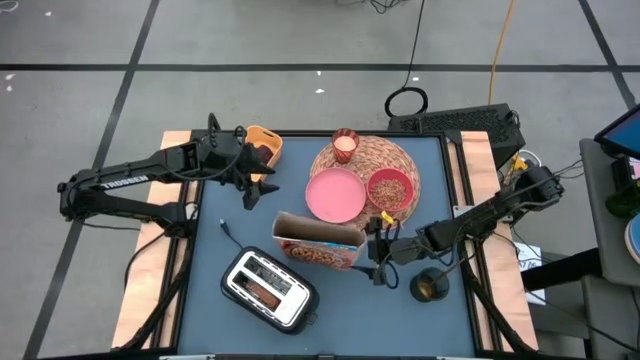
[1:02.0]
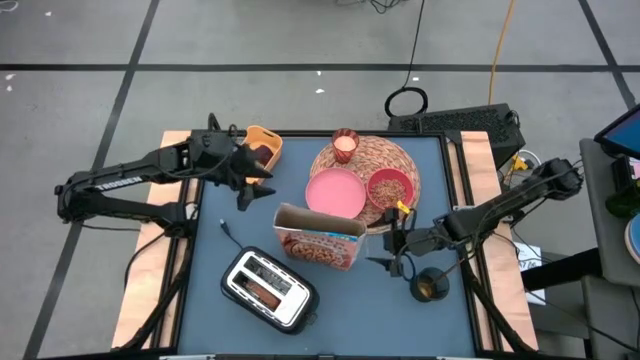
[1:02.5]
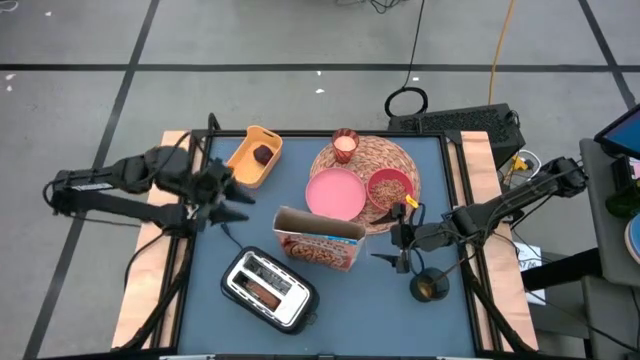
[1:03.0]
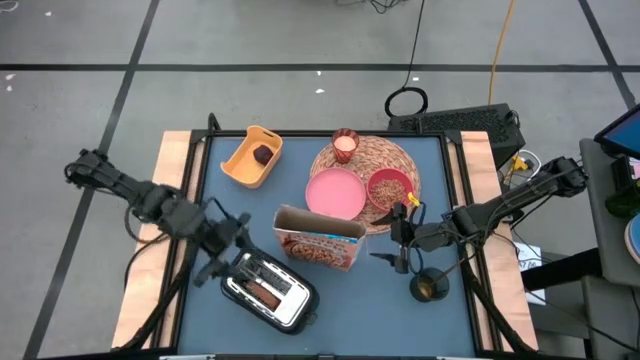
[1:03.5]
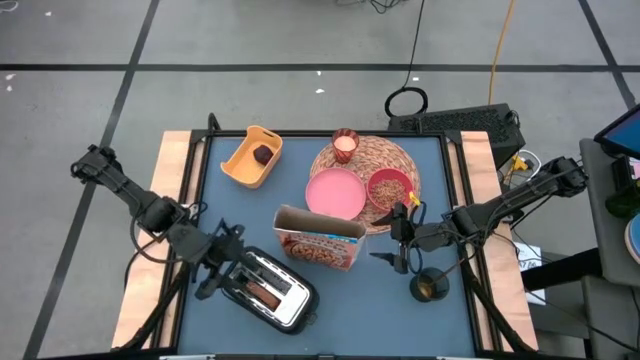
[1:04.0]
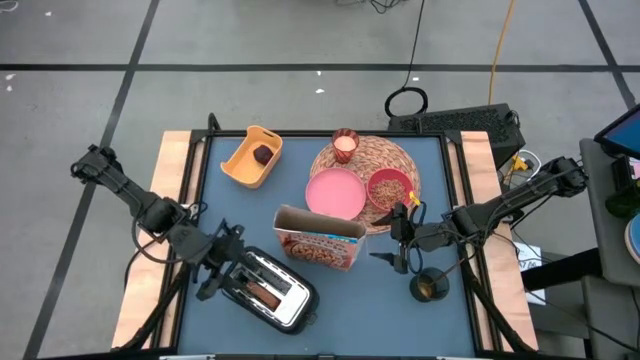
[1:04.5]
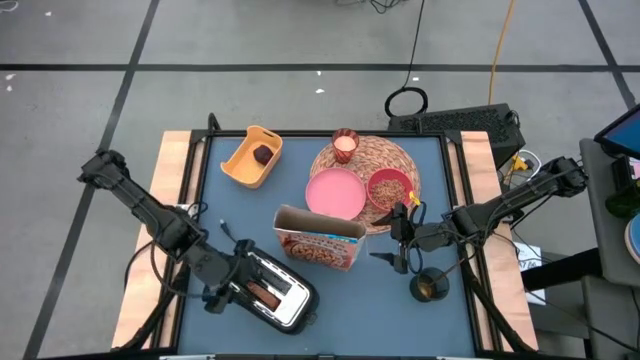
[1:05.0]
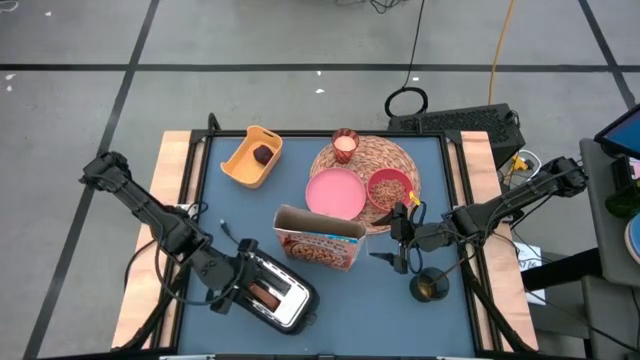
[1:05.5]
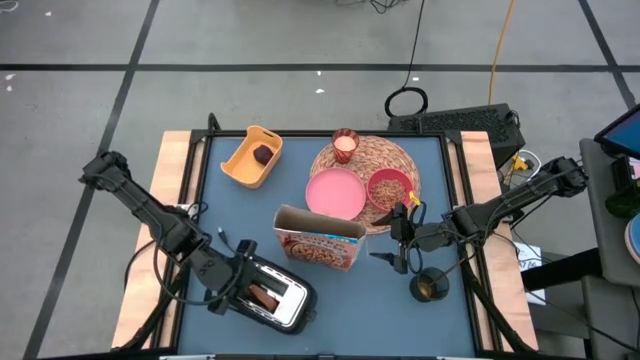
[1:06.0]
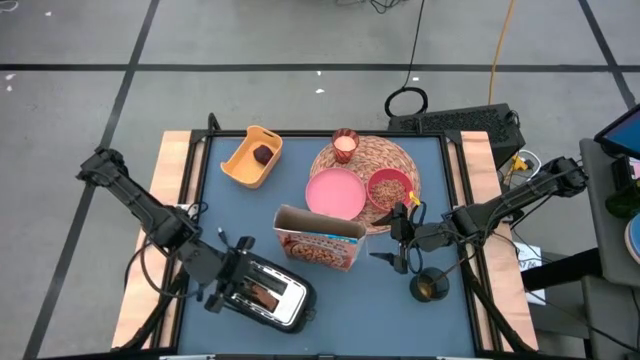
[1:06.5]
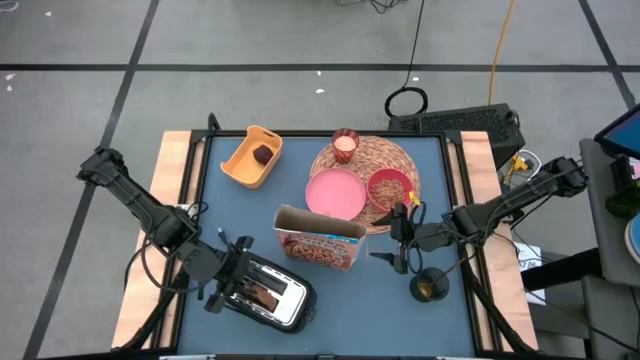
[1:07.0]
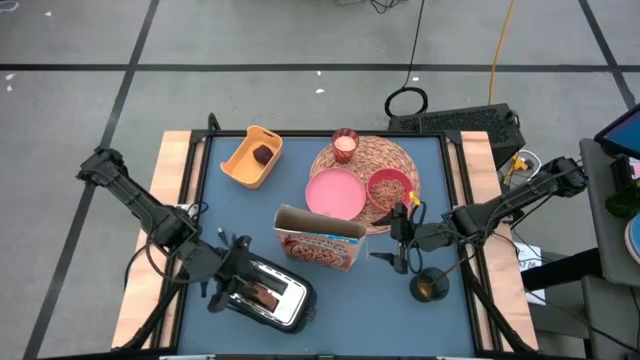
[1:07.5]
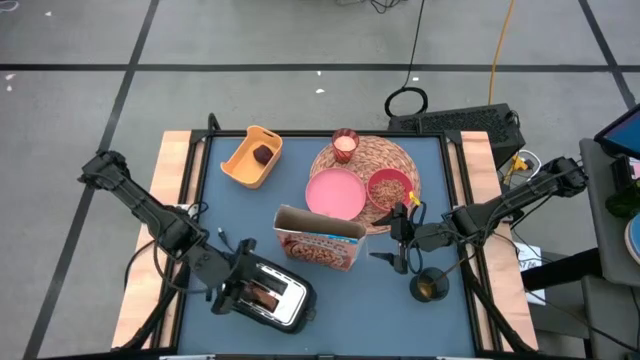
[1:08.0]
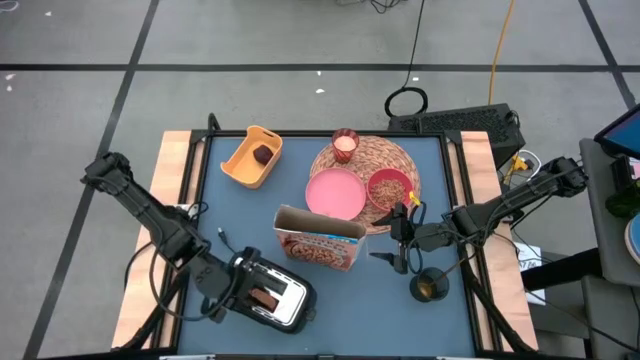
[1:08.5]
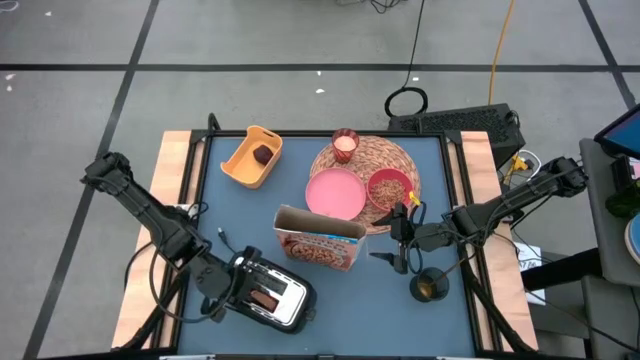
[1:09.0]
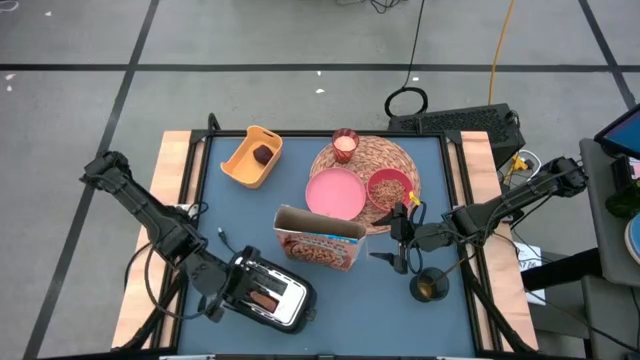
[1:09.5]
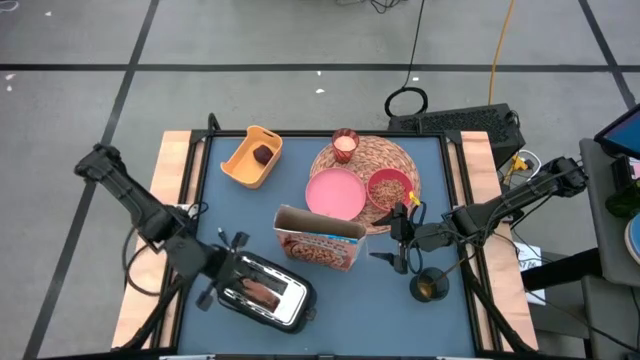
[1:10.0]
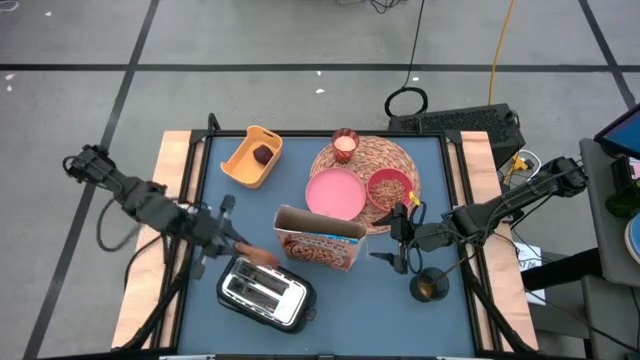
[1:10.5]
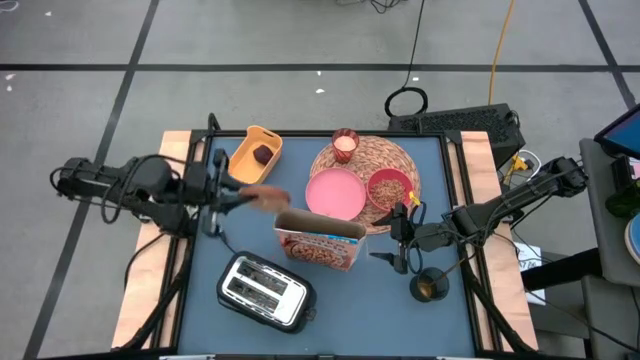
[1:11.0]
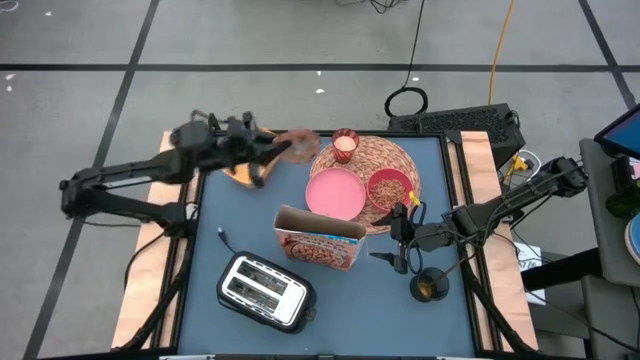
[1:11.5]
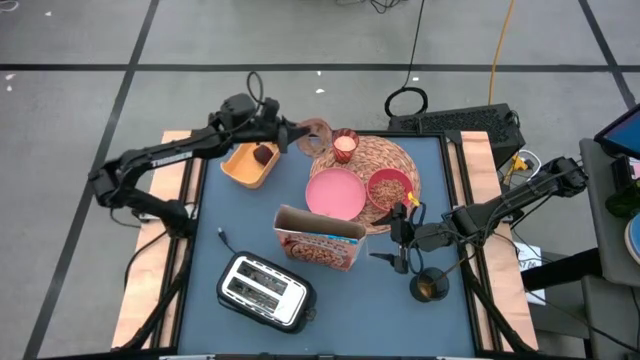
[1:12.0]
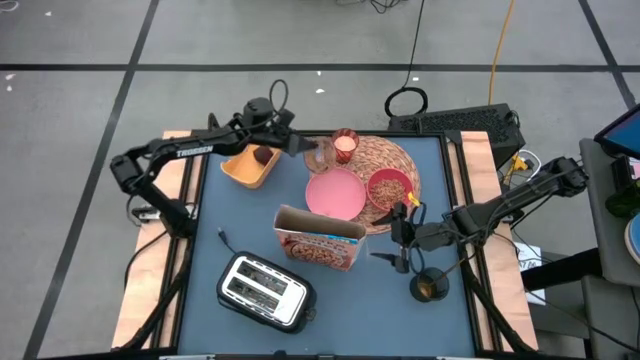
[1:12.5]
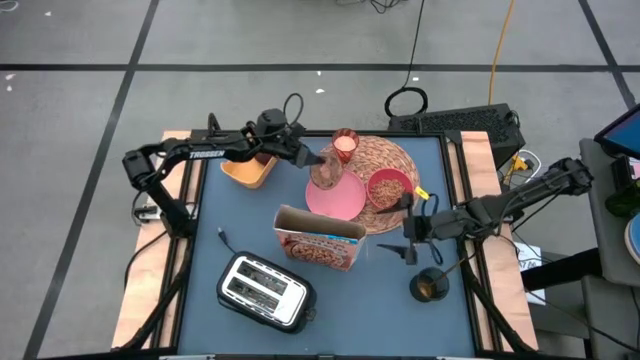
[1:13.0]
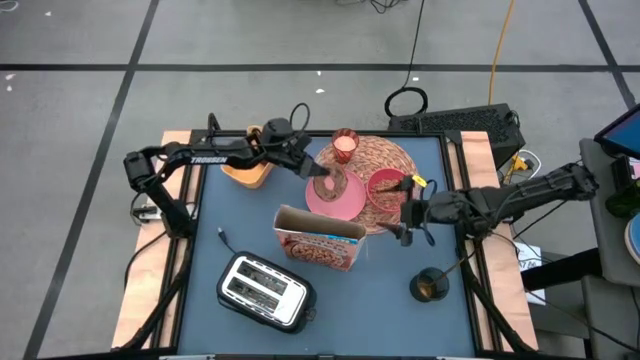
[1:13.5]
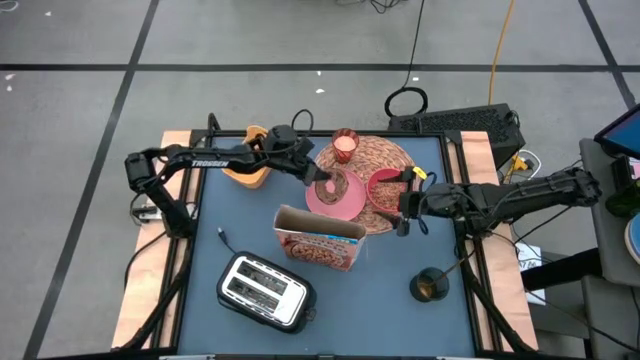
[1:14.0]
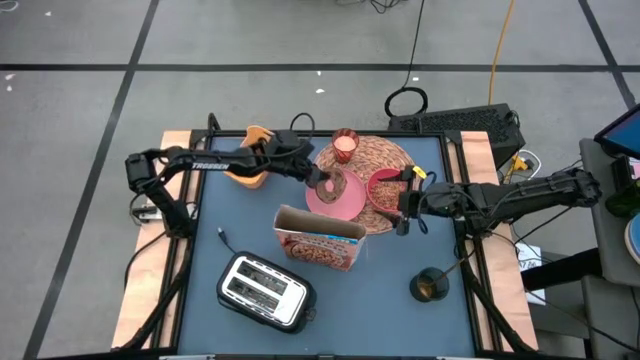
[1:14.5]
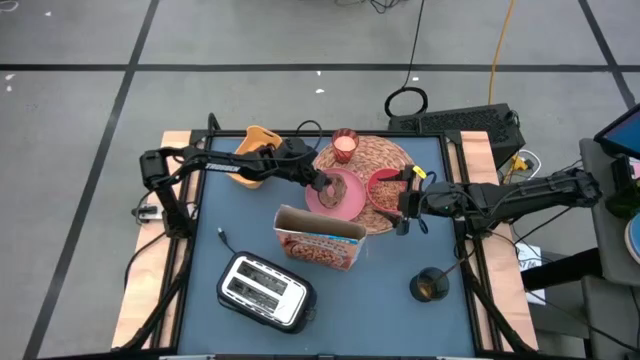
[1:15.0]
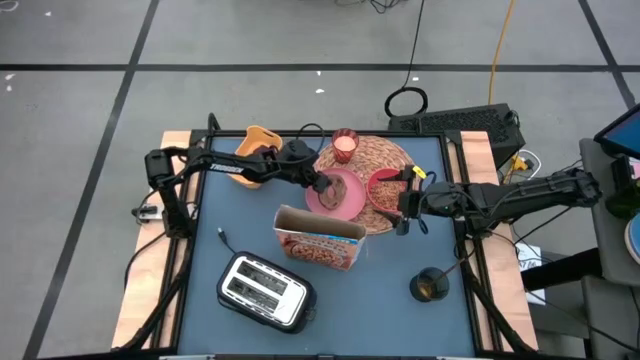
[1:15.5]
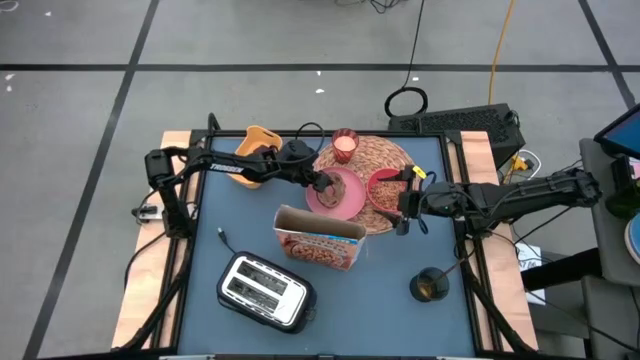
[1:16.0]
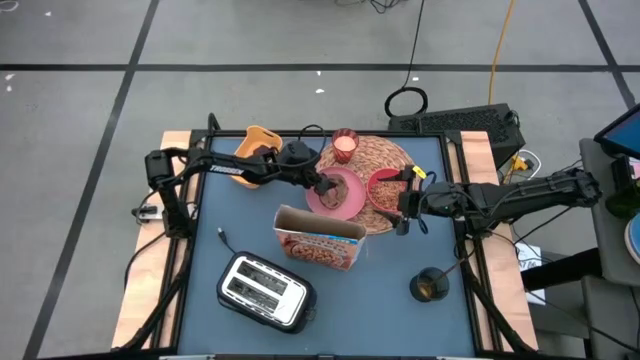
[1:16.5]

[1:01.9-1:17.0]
Task: Arrange a breakfast setting
Put the bagel on the pink plate

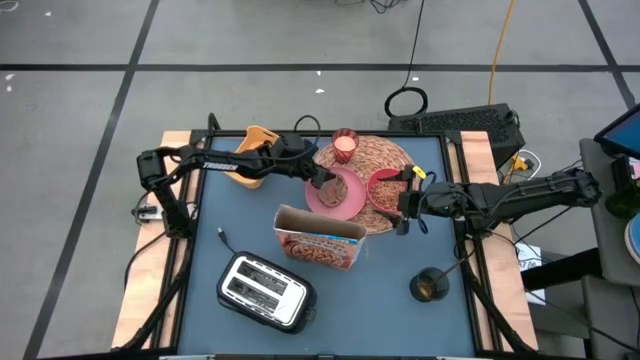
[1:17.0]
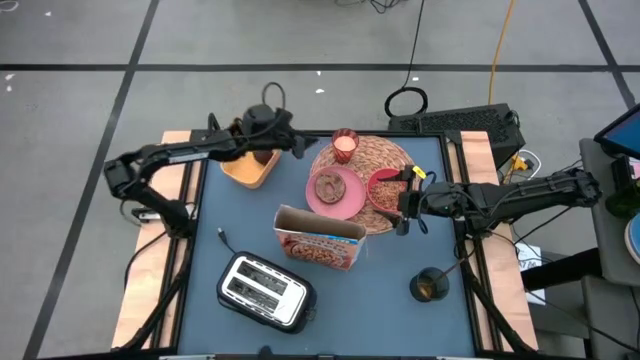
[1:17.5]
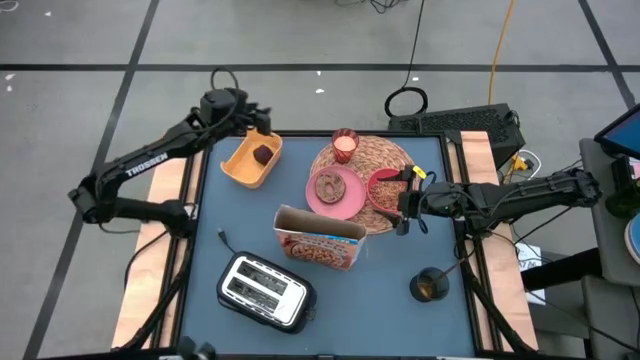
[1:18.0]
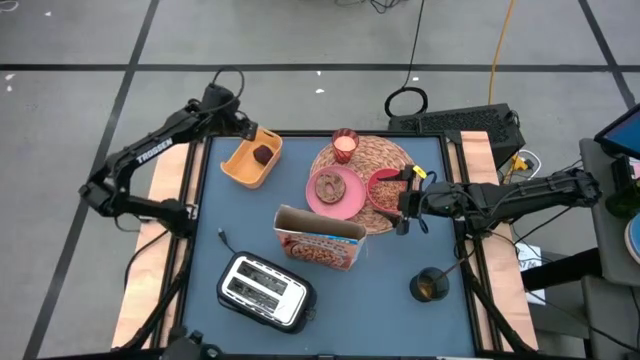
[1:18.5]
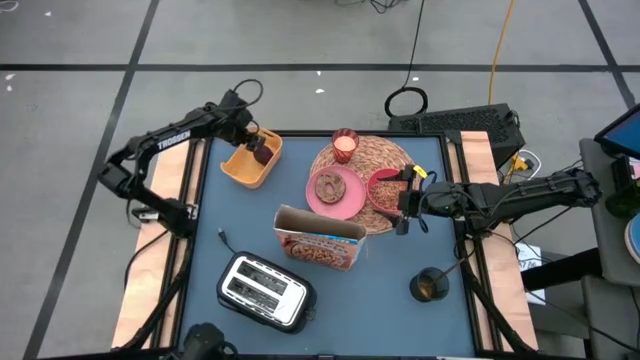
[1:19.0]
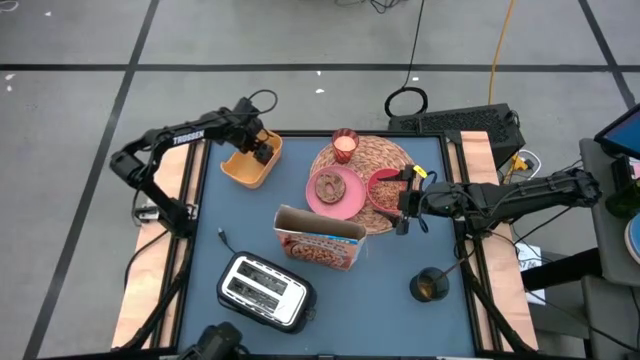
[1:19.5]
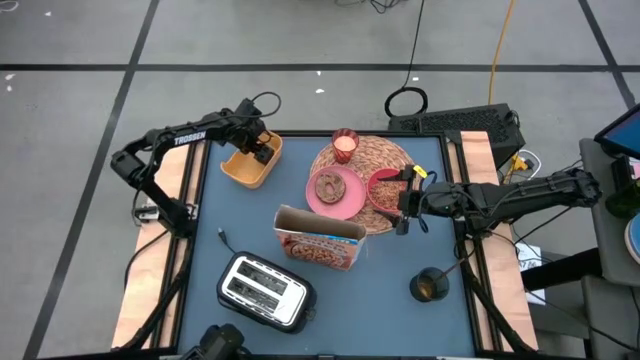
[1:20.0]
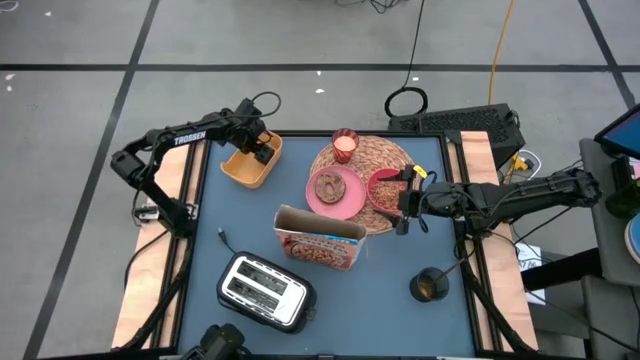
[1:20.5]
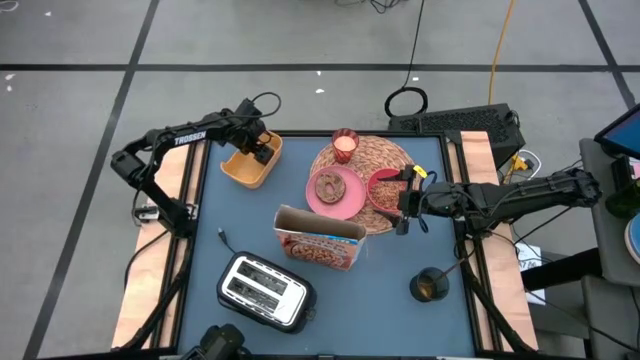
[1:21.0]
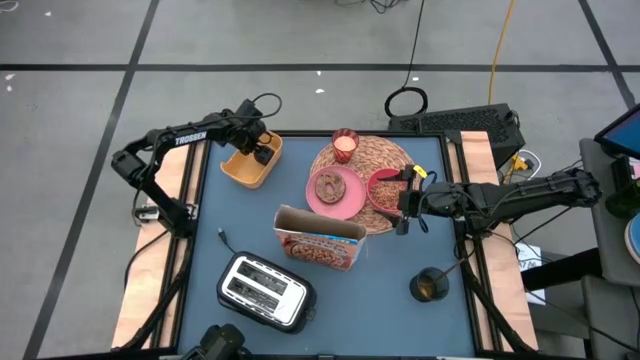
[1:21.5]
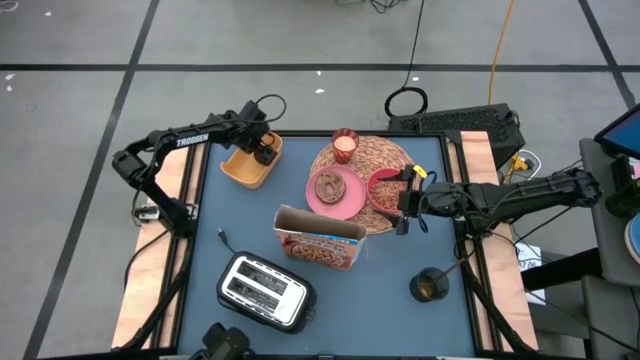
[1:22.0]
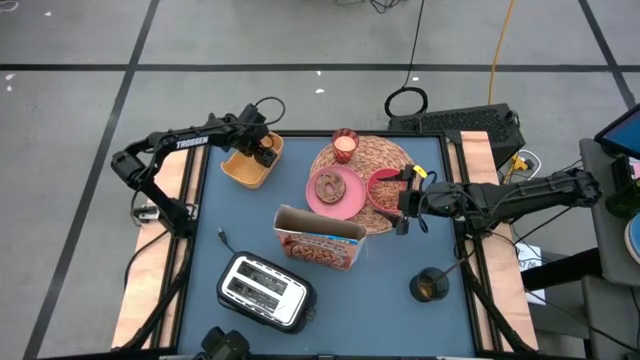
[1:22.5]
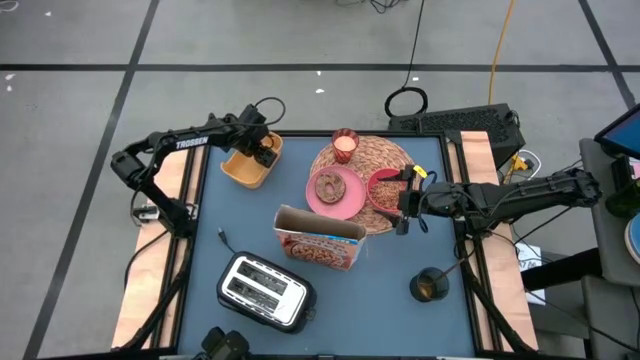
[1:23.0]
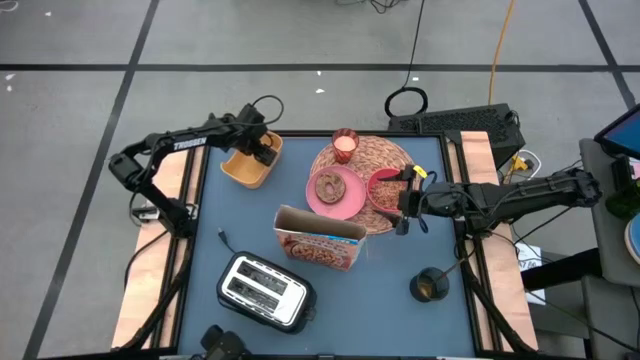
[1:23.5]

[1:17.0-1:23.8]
Put the apple on the tablemat to the top of the red bowl
